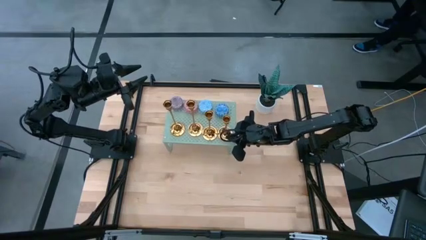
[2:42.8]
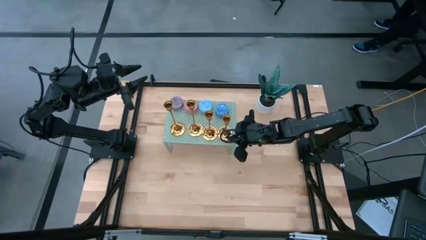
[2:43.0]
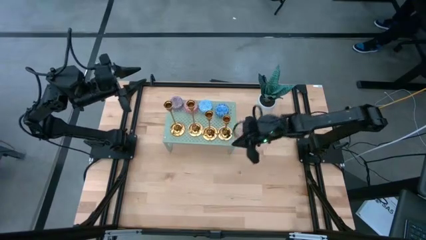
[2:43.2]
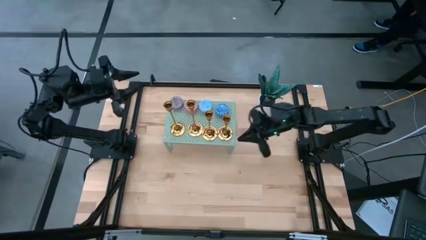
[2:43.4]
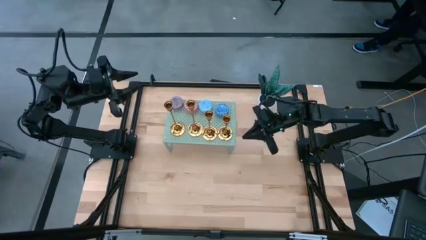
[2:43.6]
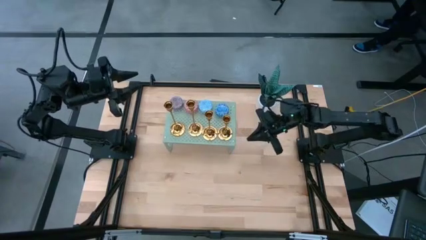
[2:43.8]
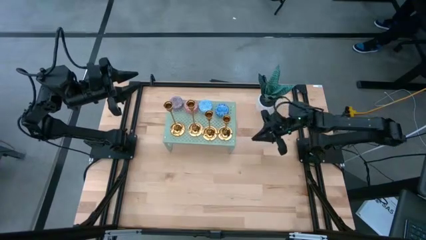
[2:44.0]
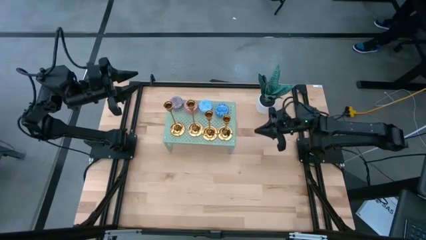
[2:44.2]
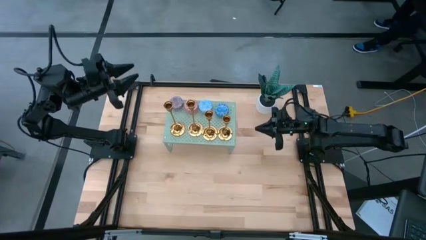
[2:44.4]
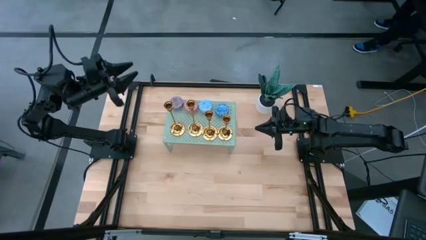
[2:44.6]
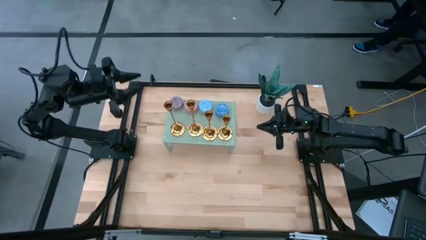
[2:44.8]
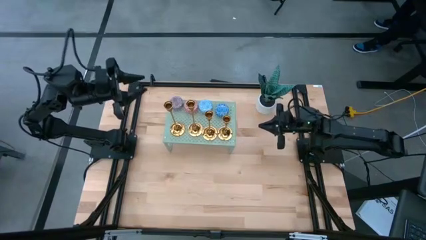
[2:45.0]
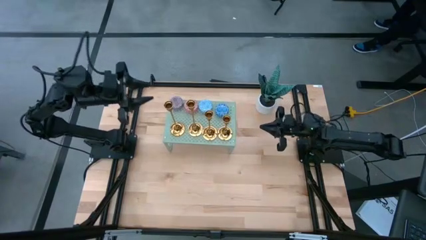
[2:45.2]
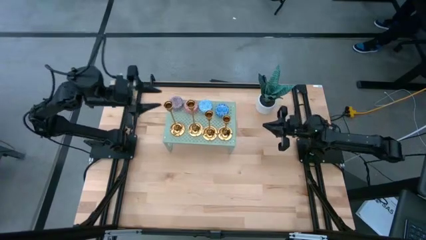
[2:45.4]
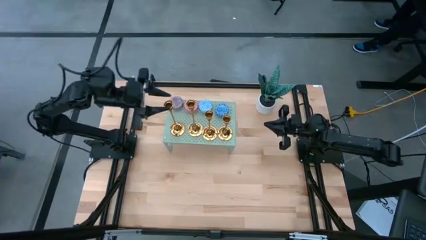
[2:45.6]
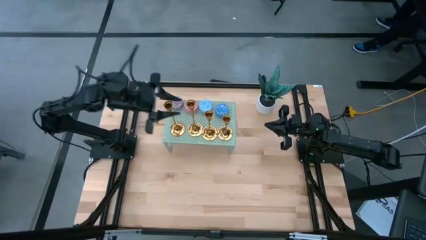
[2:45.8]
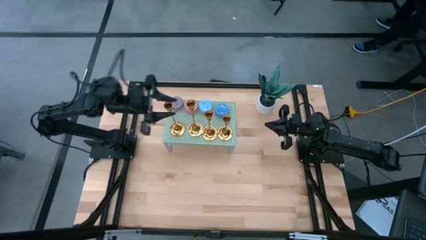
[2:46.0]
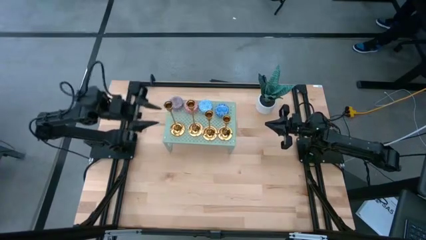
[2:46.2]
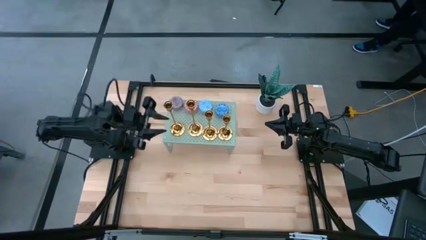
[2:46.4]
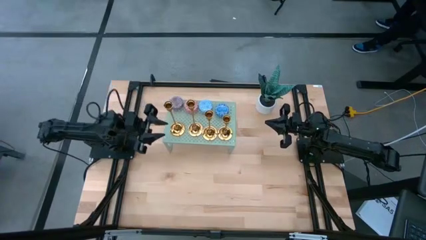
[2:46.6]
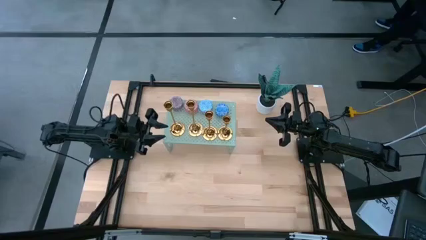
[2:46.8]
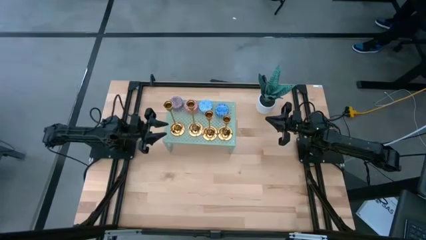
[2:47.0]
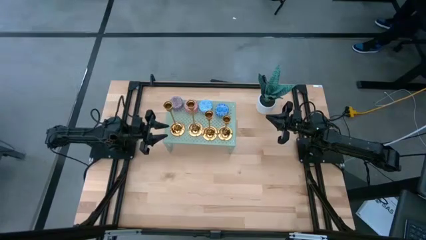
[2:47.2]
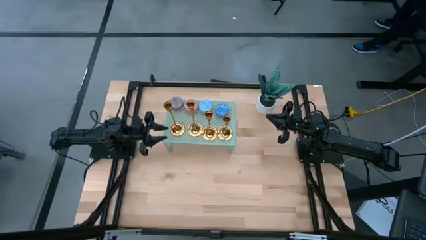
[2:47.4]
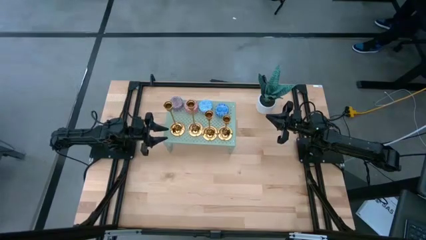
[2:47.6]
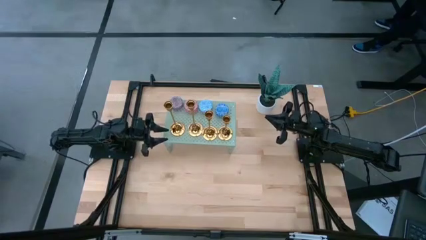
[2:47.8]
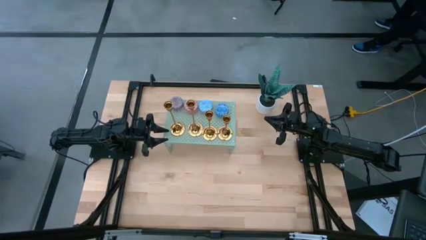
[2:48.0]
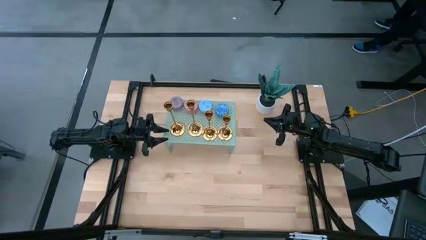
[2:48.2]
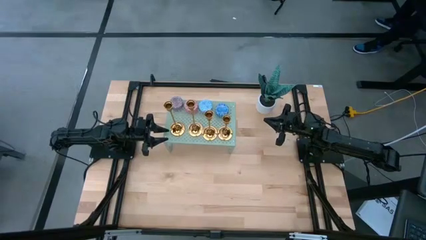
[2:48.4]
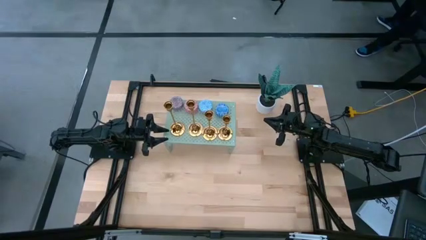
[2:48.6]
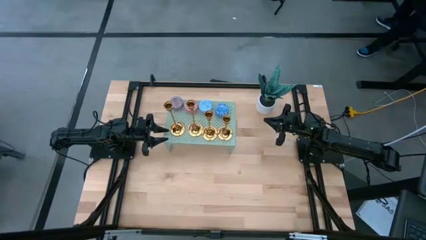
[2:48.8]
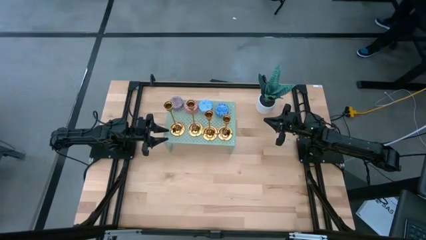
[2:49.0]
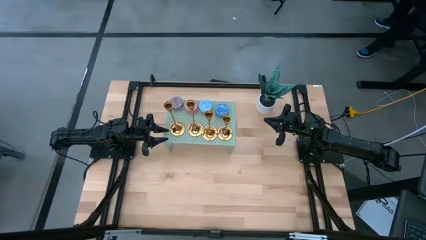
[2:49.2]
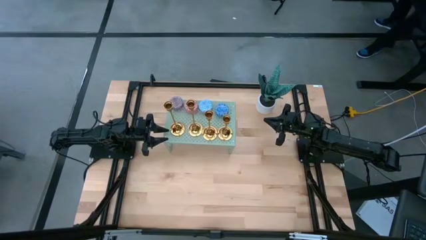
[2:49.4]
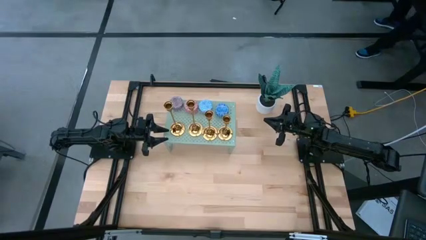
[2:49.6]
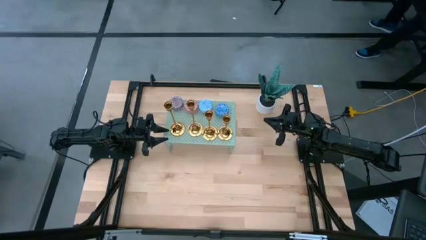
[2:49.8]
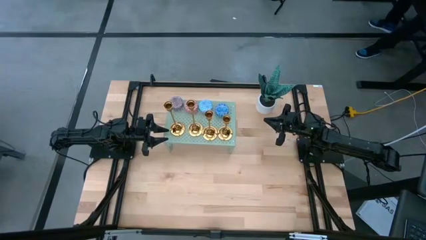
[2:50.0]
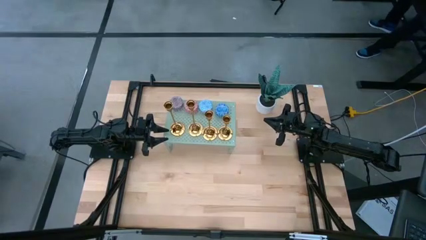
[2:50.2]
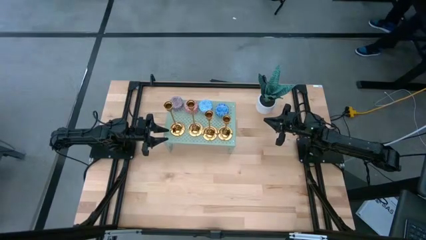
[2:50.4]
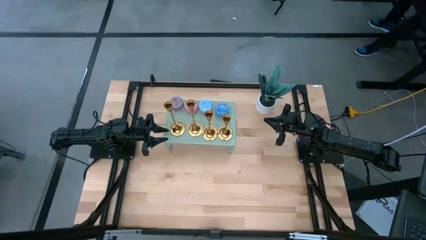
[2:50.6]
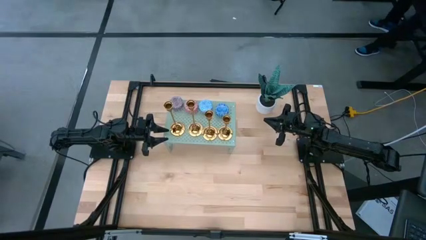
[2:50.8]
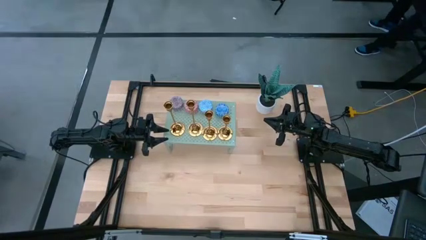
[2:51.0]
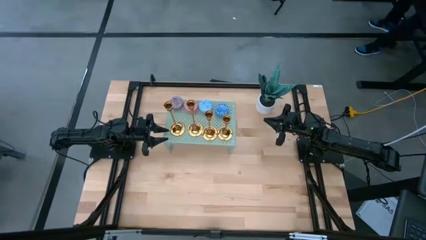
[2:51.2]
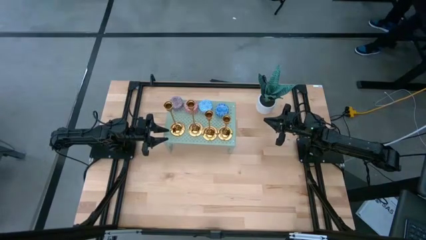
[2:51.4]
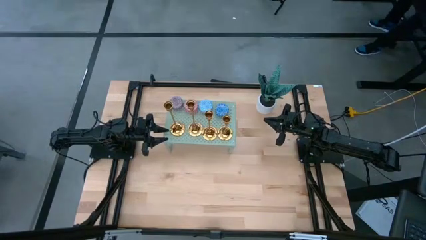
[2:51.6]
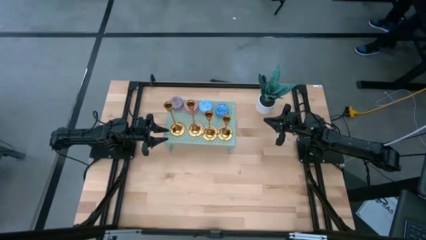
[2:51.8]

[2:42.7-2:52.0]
Task: Pick & Place candle stick holders
Return to Home Position

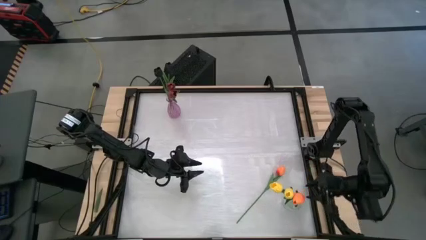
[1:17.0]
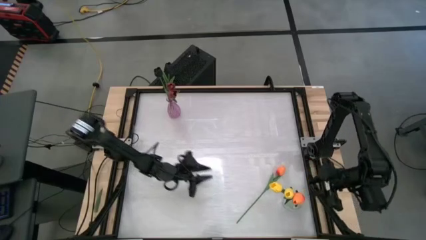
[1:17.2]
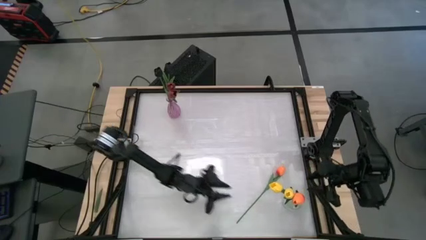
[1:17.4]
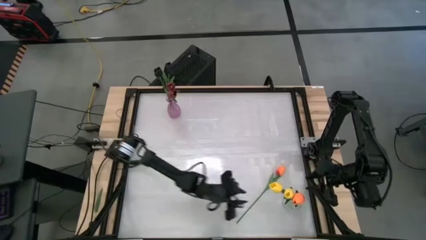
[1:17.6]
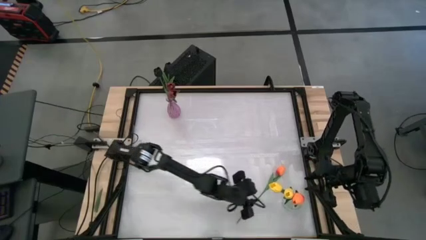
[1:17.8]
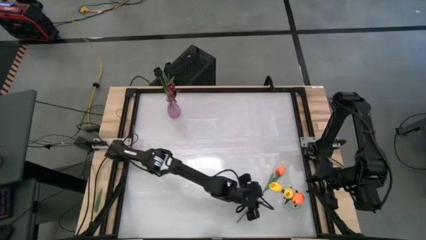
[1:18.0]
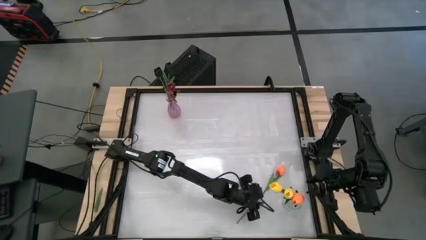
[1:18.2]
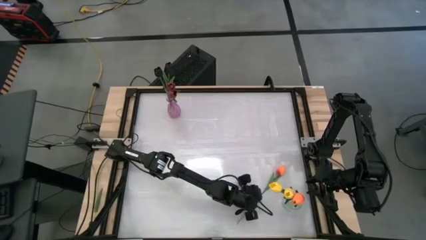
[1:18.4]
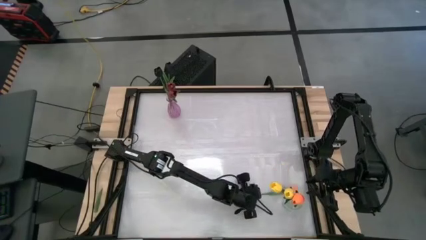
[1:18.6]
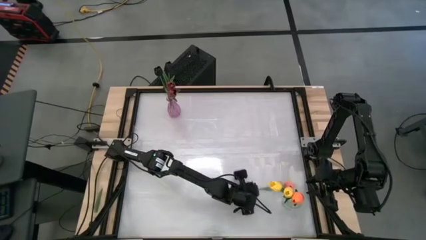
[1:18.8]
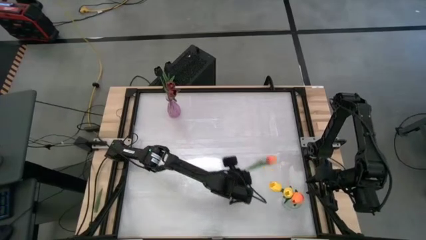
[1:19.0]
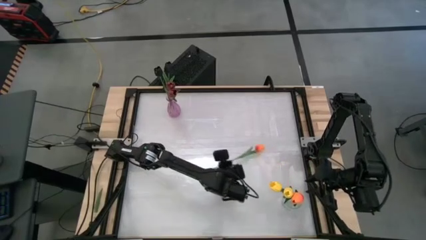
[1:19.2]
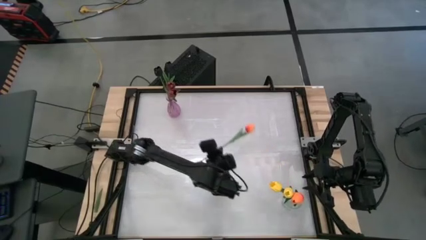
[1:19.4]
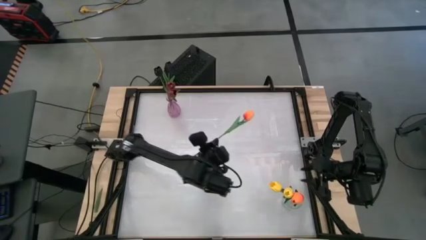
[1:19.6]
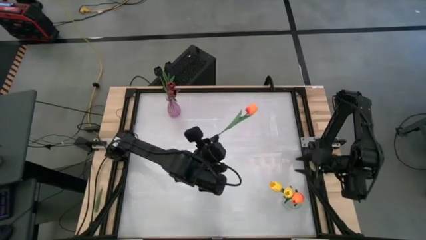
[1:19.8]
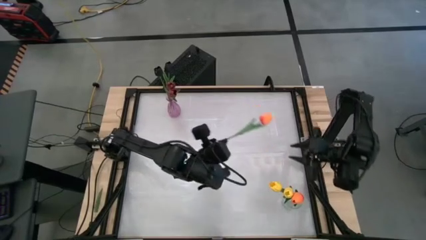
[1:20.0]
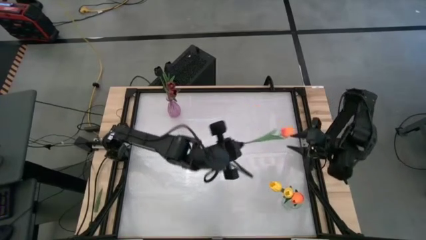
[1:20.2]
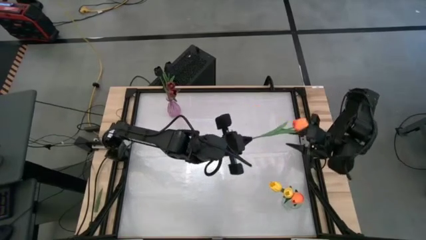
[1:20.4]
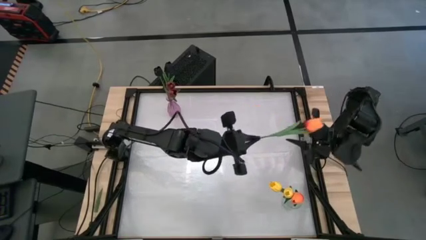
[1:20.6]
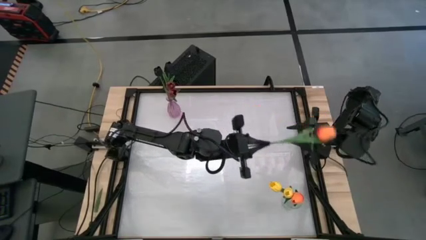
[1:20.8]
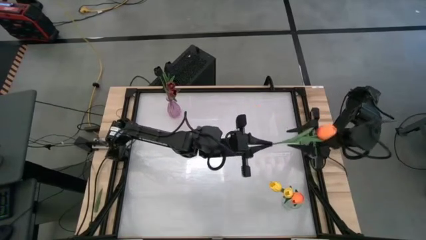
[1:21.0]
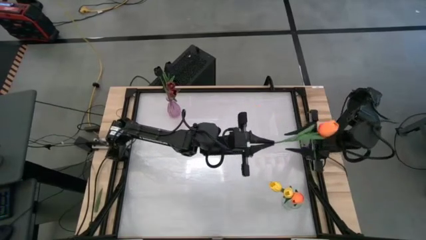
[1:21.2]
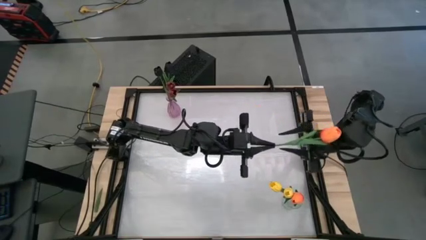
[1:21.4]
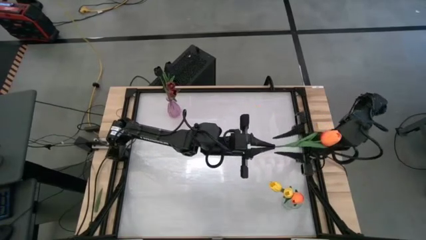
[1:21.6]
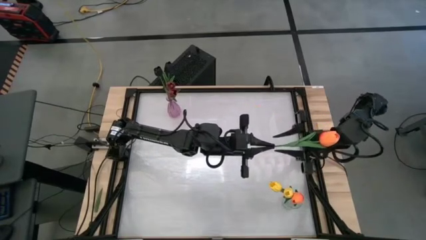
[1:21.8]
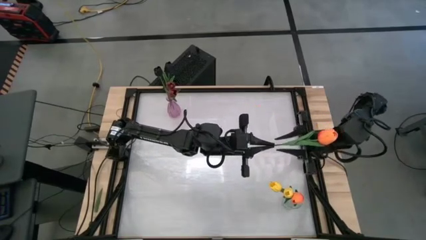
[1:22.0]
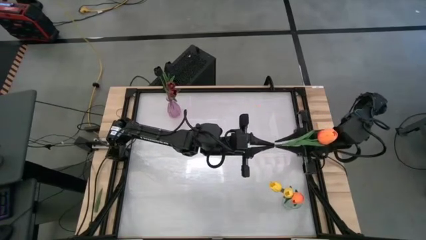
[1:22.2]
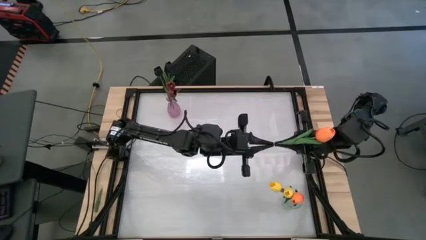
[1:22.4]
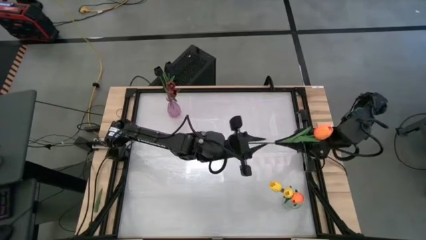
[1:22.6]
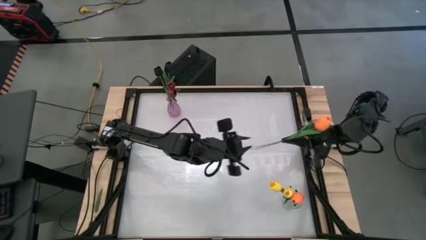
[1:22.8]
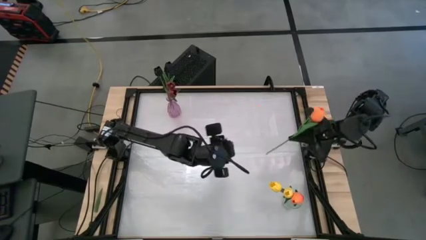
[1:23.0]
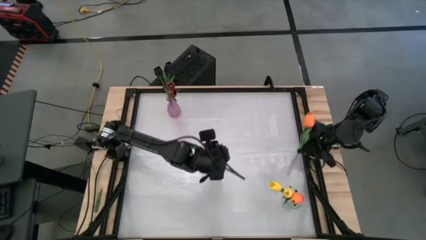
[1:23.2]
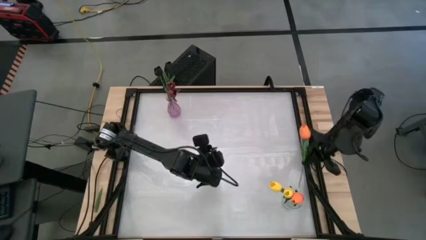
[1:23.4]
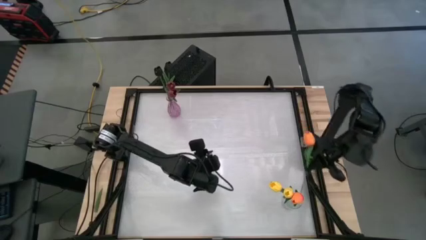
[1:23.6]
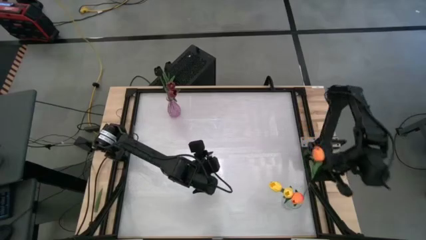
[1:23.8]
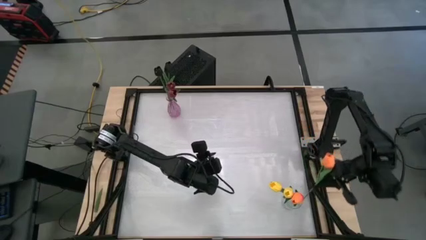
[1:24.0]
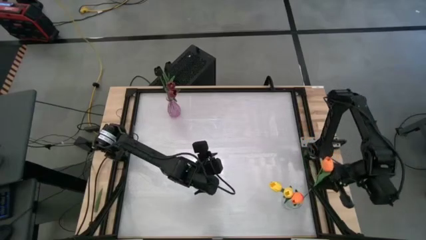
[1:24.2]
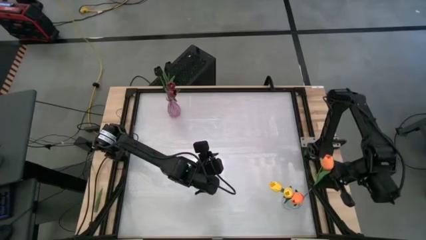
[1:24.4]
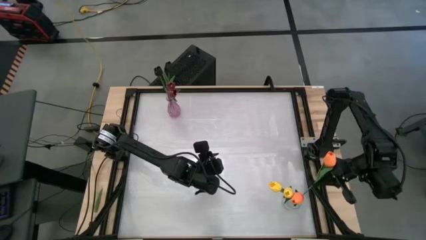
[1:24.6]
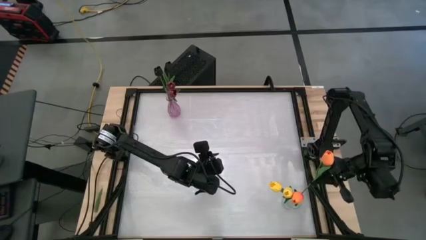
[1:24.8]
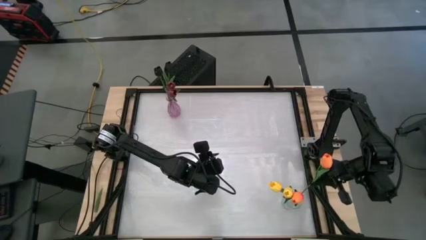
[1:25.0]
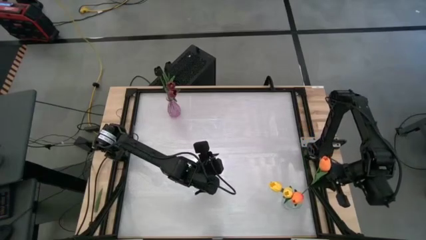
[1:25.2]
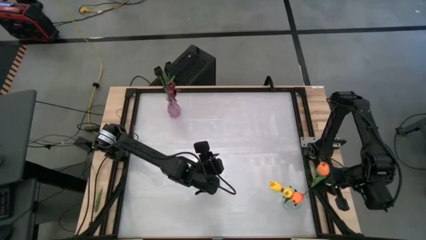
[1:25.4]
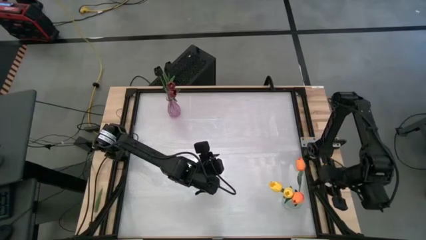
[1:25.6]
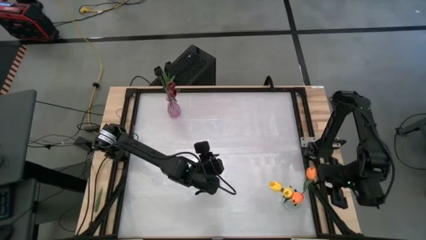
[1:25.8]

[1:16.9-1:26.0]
Task: Sort flowers into vase by color
Put the orange flower into the transparent vase
